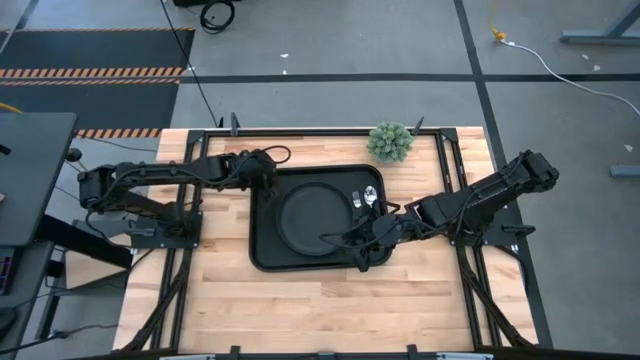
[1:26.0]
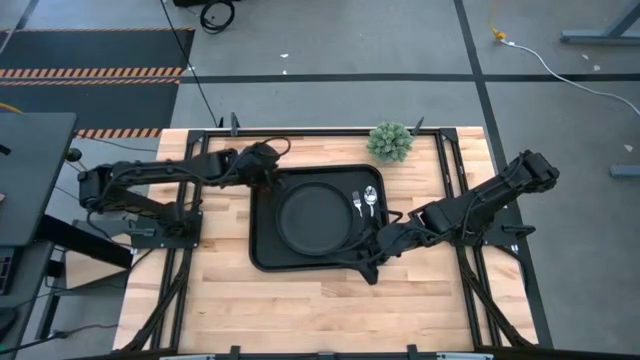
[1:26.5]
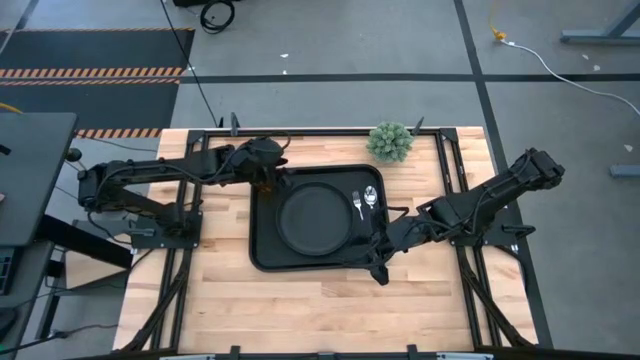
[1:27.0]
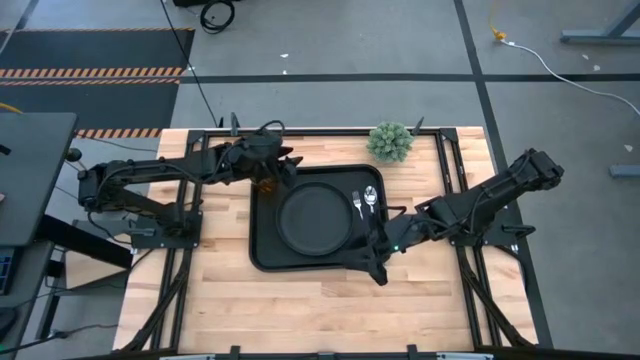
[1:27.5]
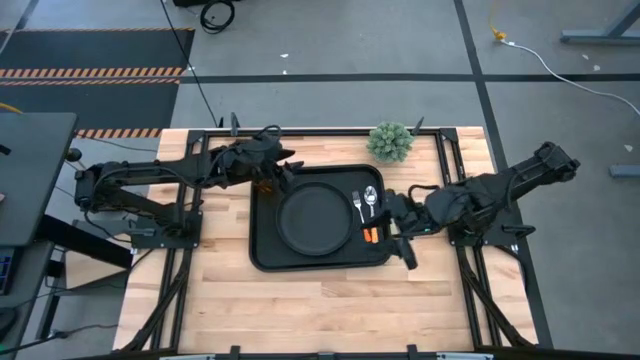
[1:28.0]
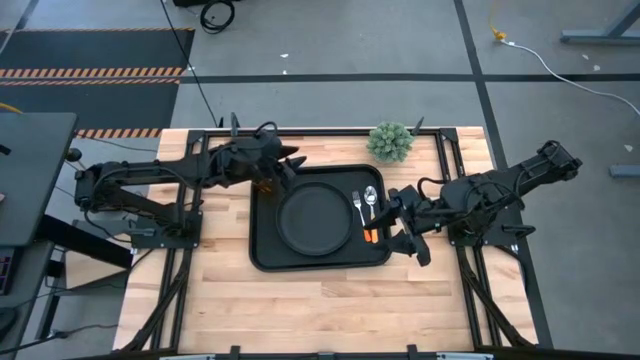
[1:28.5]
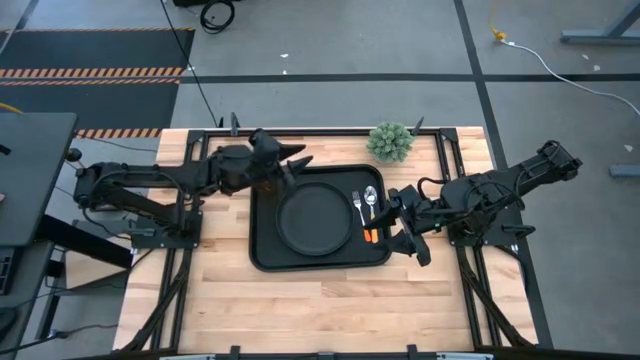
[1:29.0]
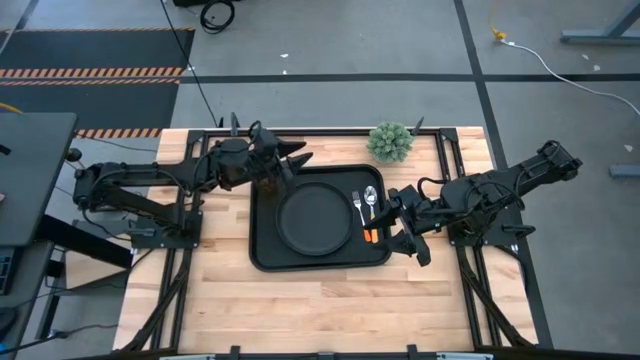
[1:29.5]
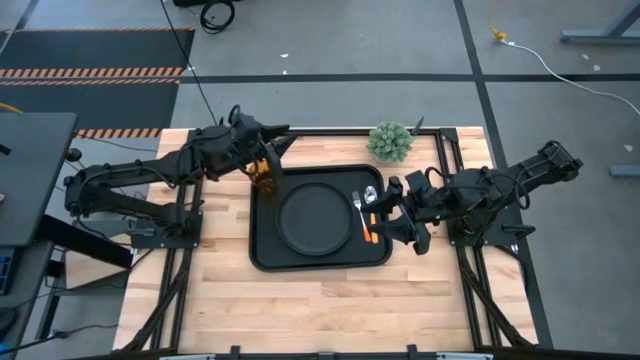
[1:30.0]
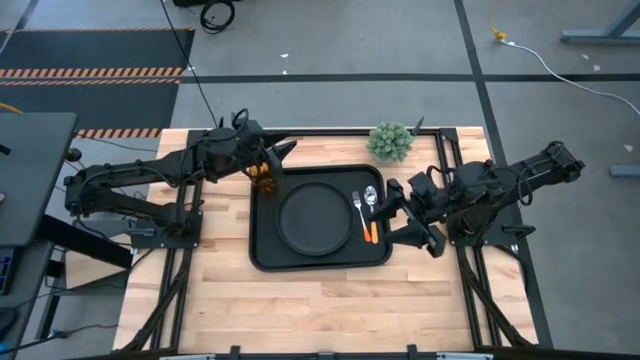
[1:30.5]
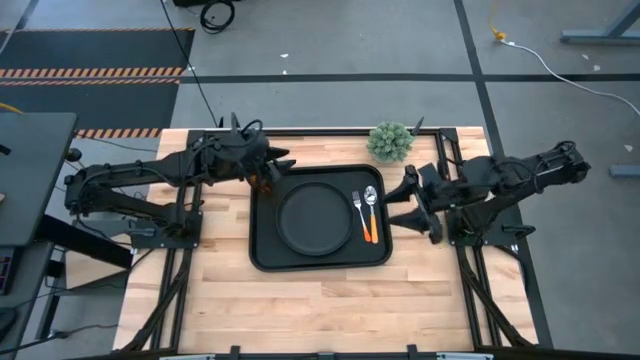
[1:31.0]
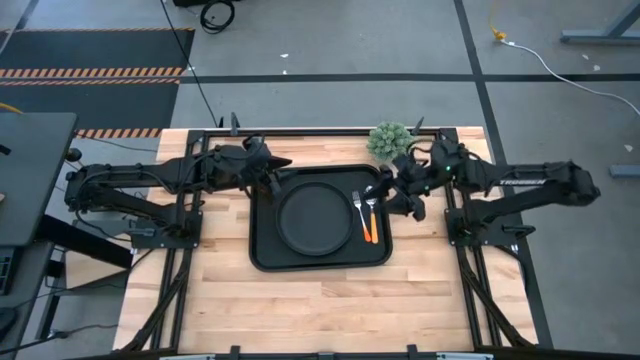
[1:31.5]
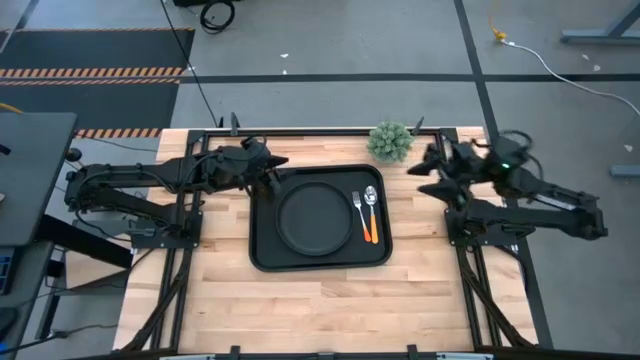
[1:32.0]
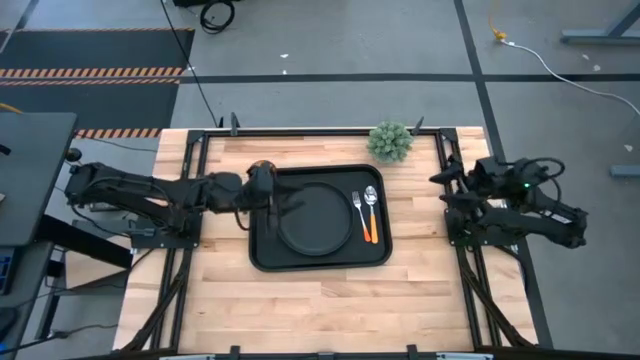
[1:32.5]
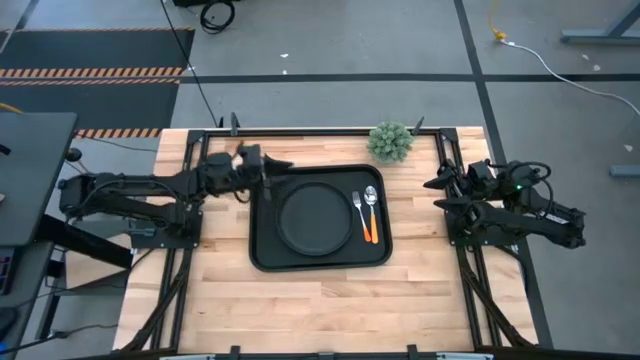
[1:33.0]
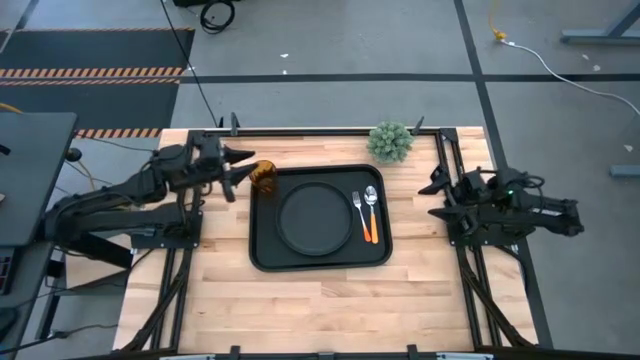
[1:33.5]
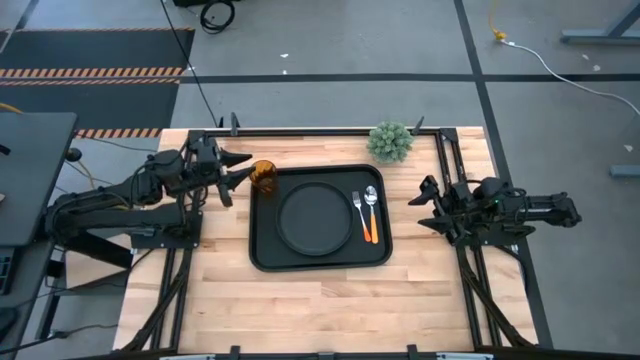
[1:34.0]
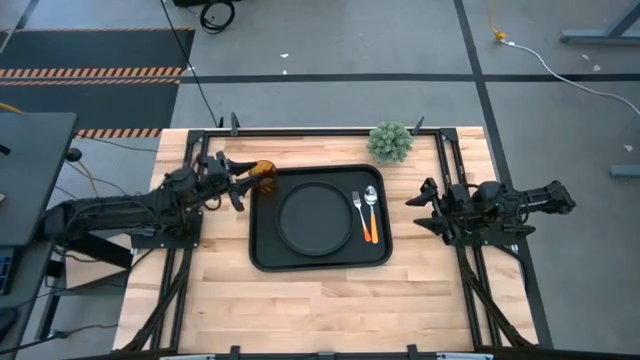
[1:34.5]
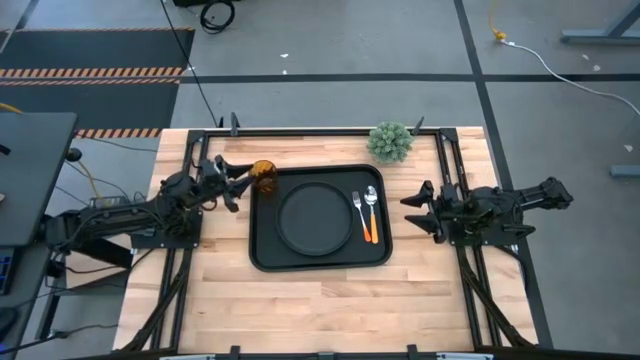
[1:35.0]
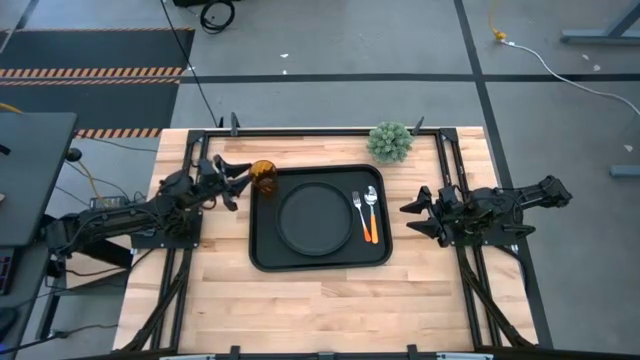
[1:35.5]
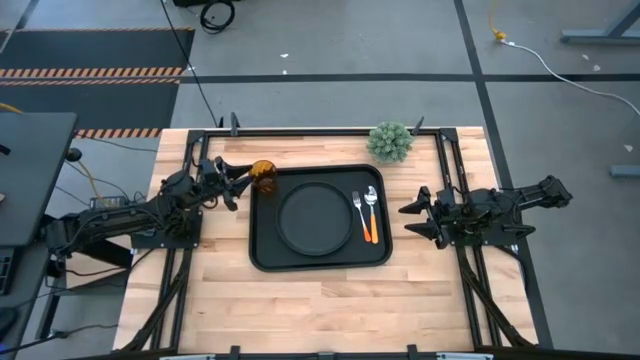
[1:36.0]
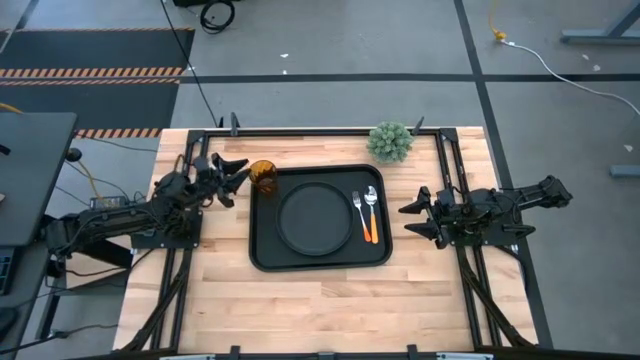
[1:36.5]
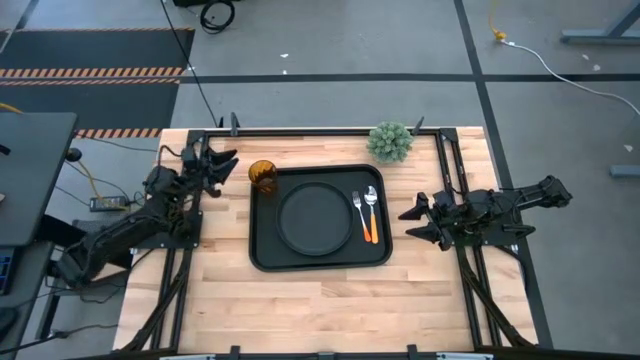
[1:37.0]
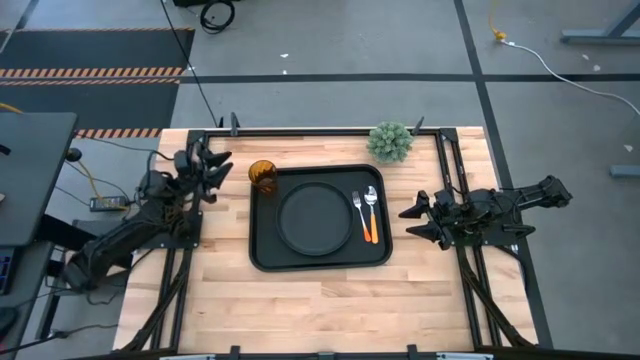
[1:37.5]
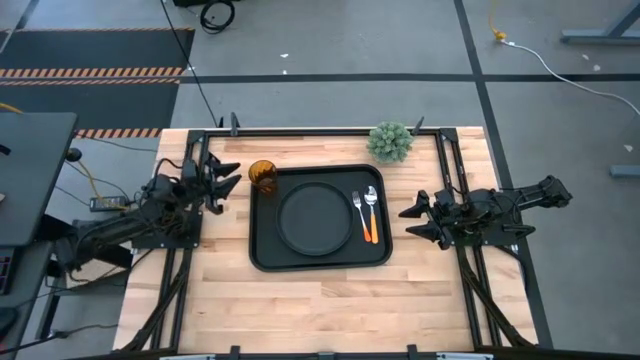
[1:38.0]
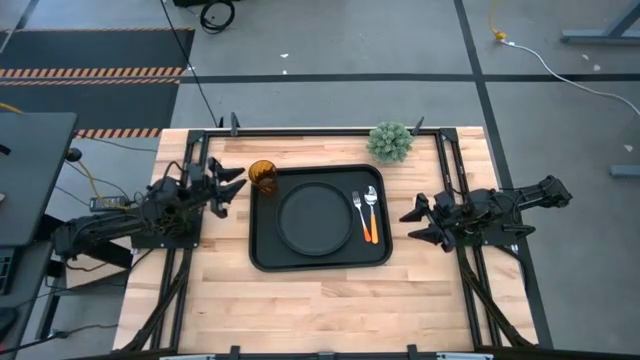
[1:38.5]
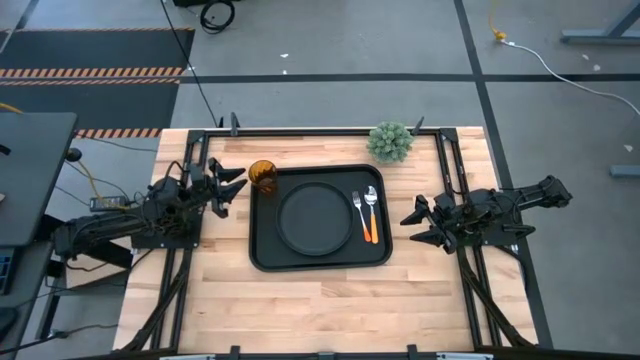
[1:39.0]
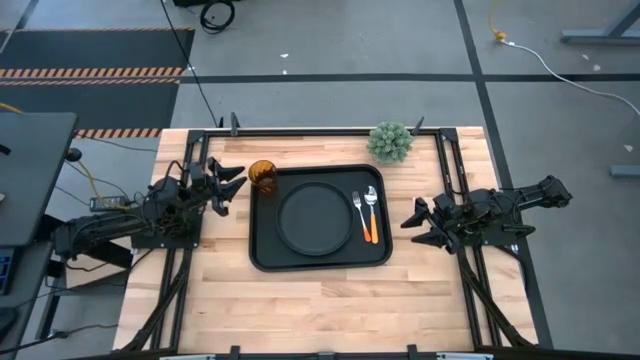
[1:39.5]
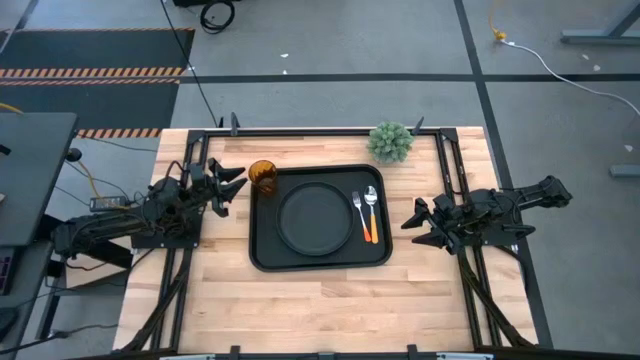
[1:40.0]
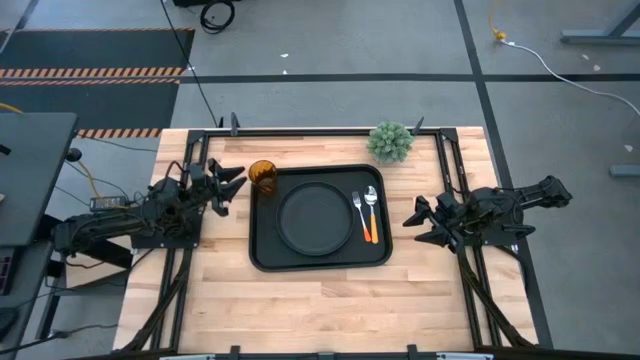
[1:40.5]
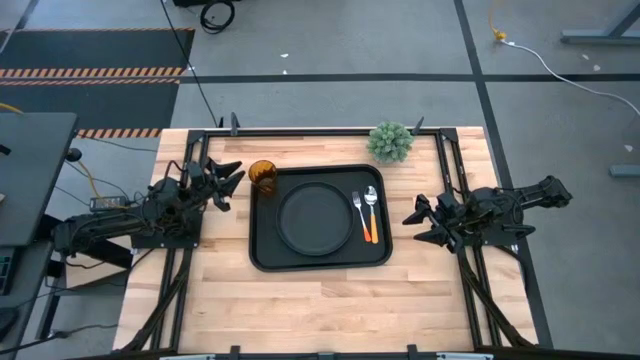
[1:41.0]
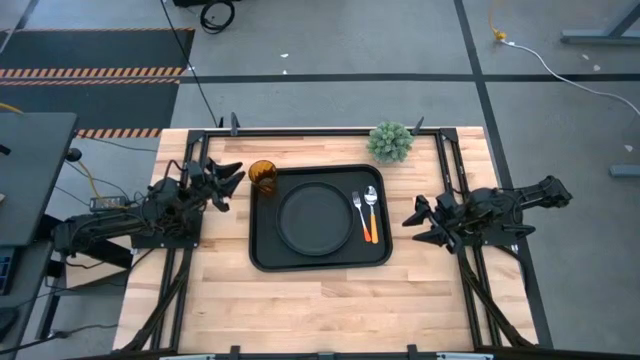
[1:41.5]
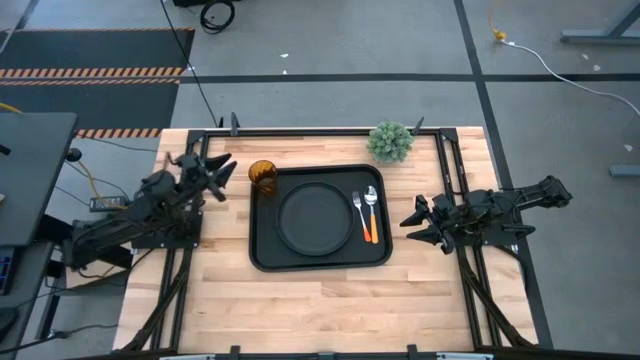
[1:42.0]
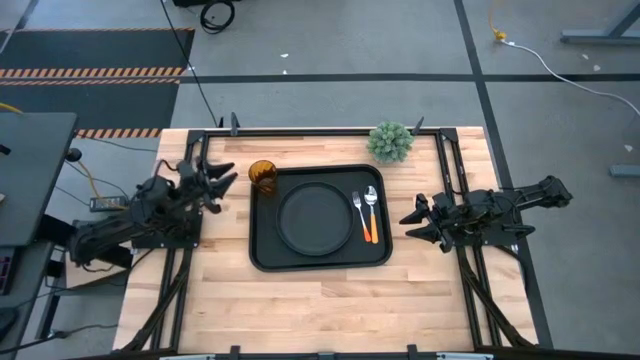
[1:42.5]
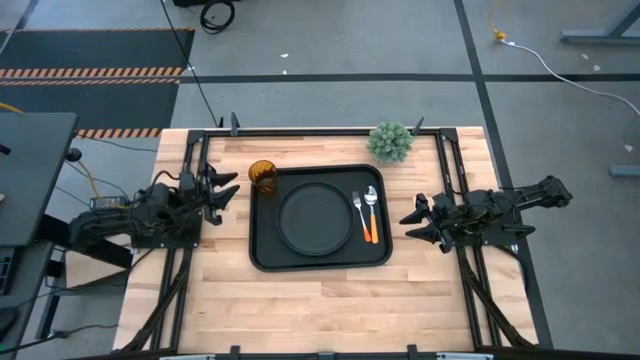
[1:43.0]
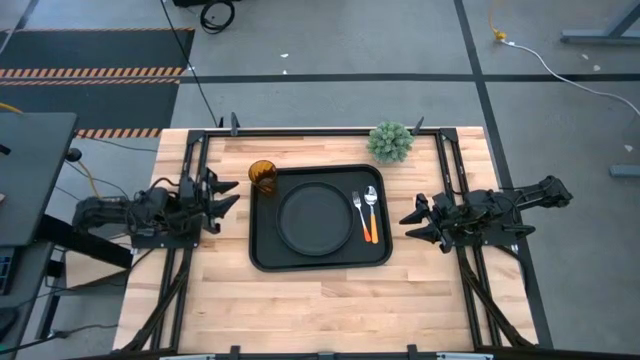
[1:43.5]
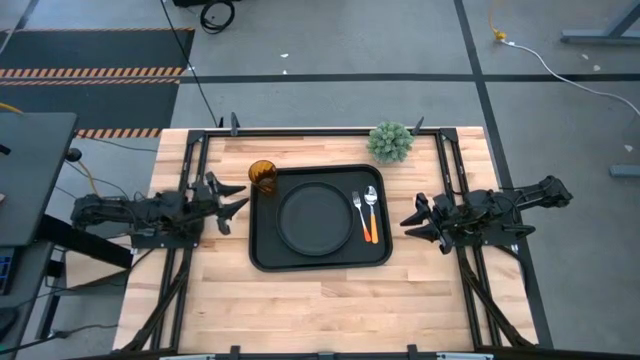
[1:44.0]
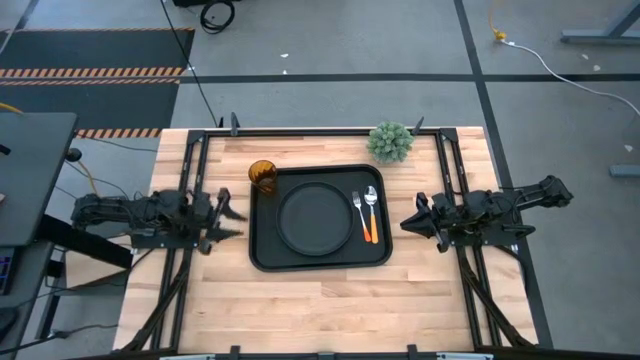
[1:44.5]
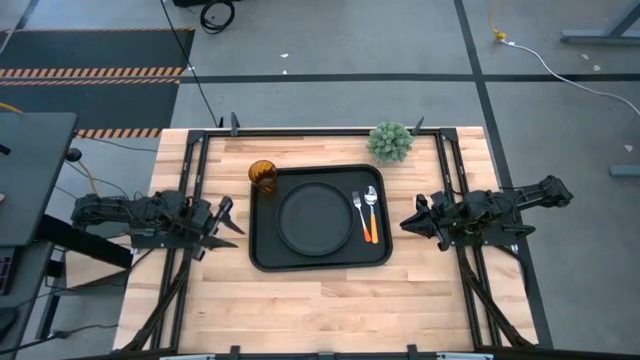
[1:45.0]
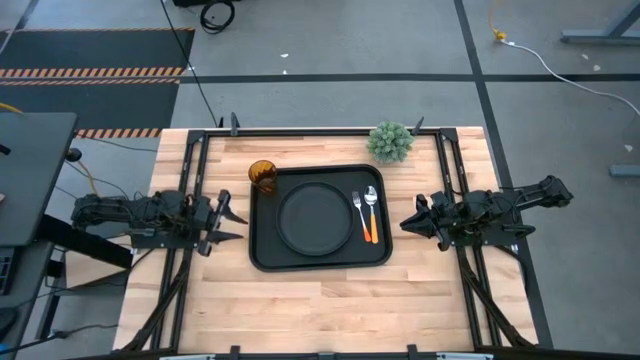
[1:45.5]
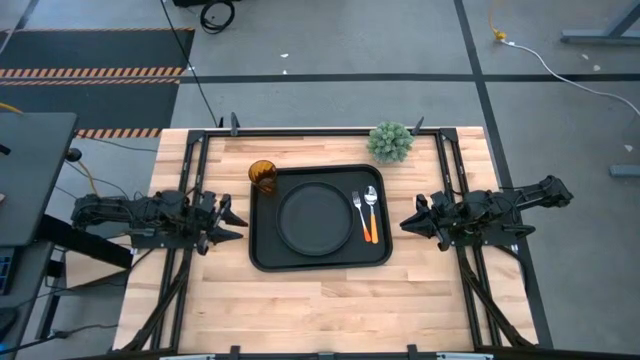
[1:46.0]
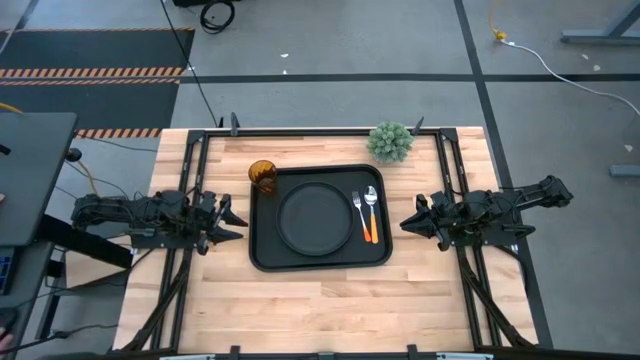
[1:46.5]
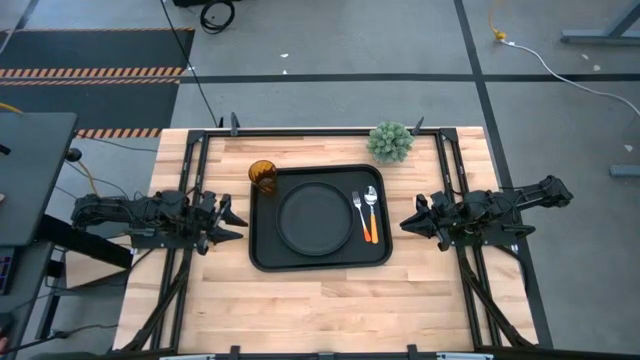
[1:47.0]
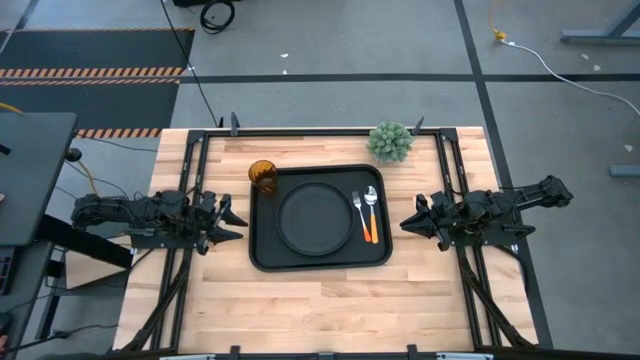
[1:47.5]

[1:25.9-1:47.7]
Task: Pick and place plate/cup/fork/spoon on tray
Return to Home Position
